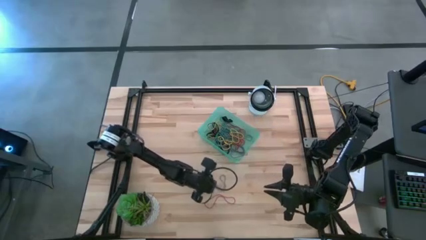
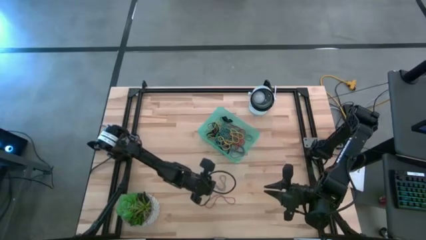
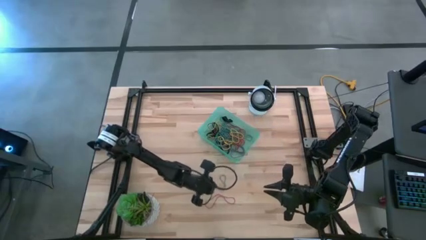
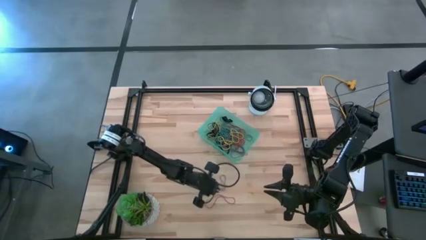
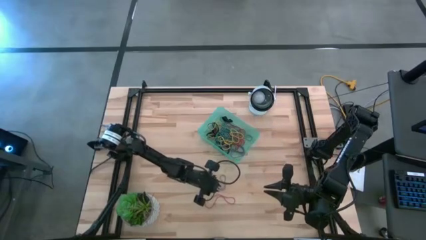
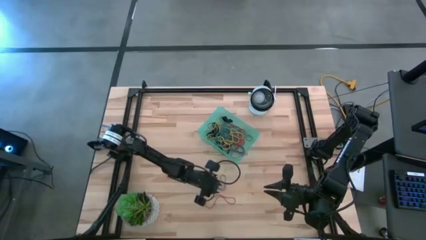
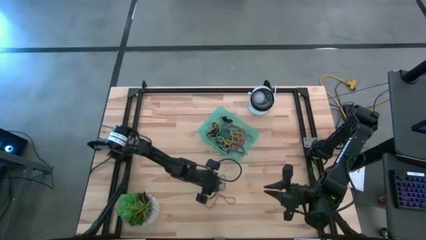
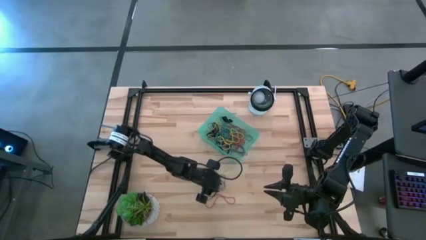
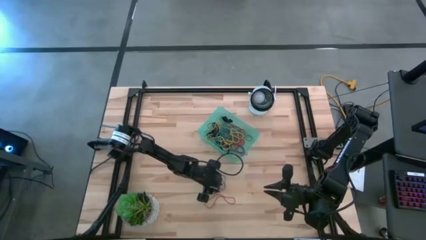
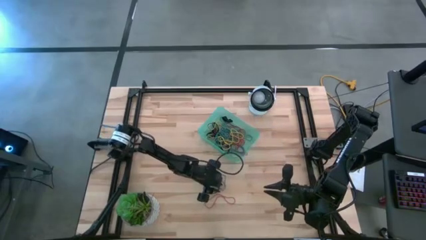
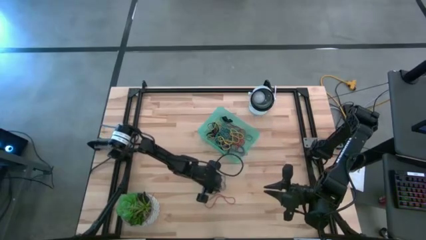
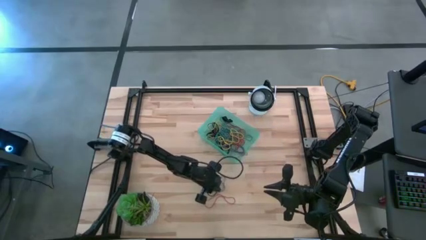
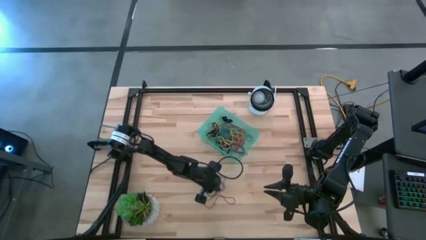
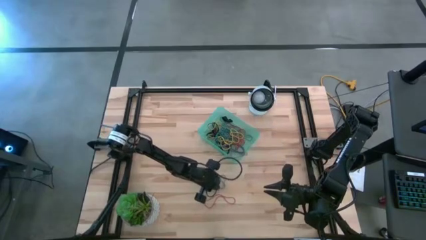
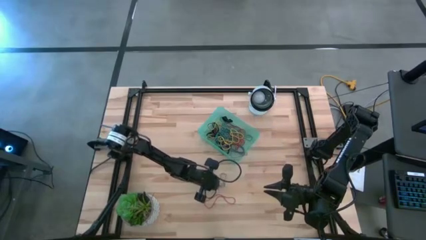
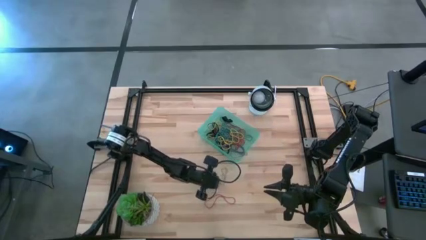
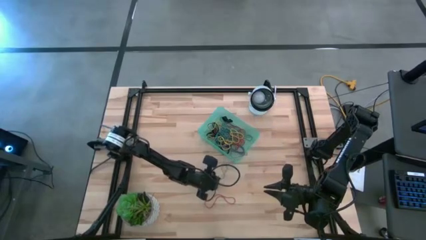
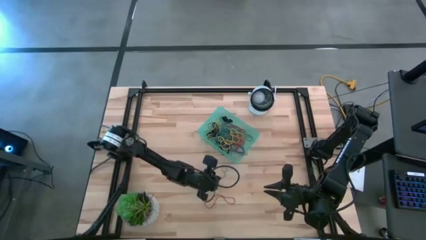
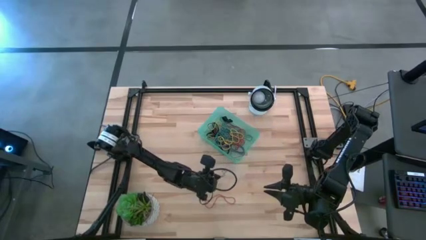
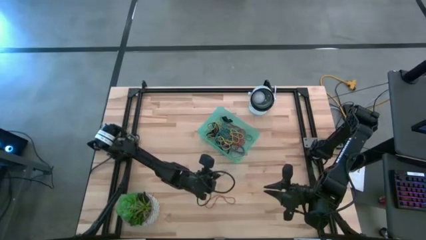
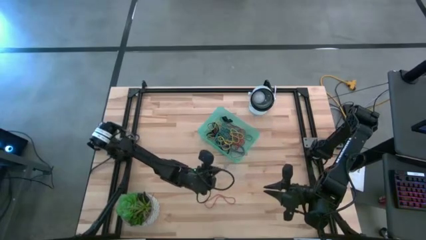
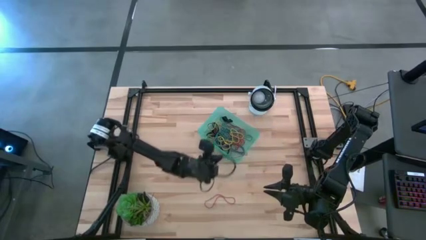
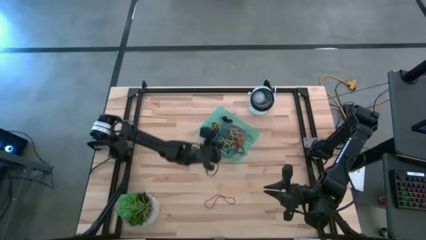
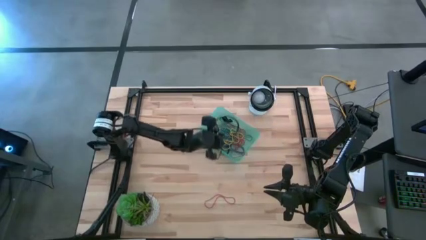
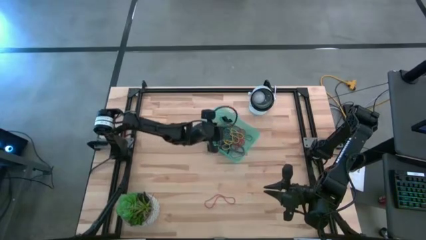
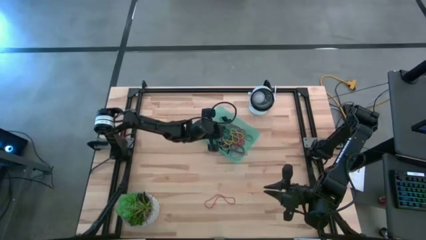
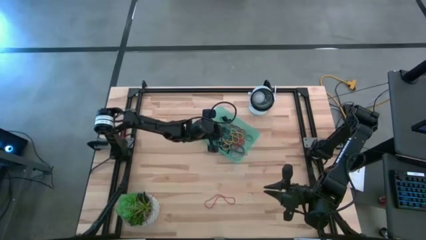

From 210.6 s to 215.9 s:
Task: Pick and place rubber bands into bin
Put the blue rubber band into the blue bin

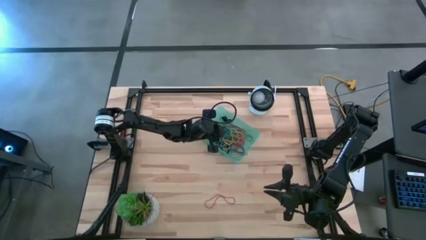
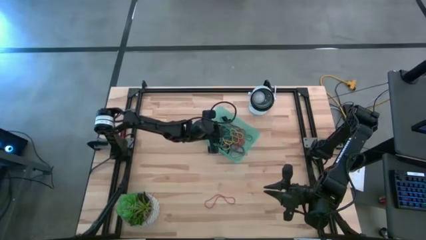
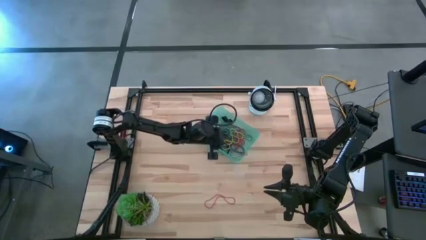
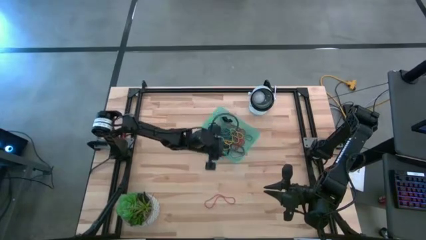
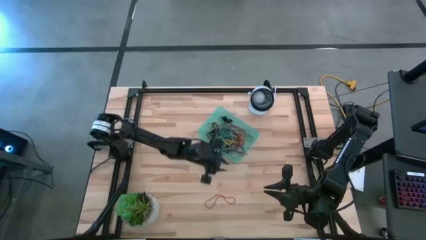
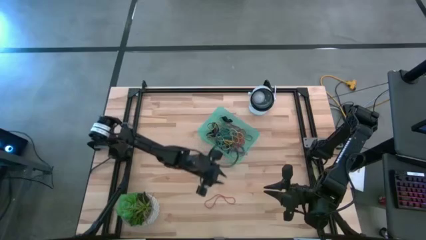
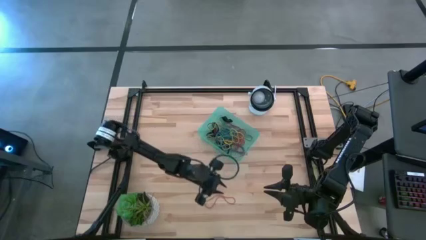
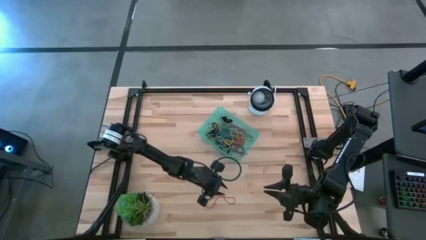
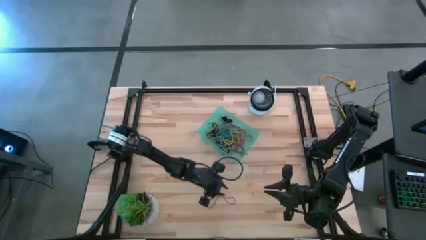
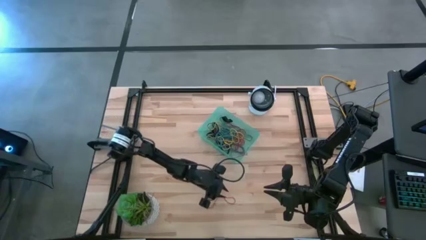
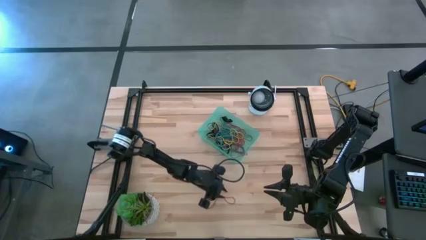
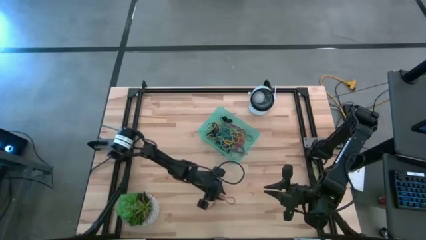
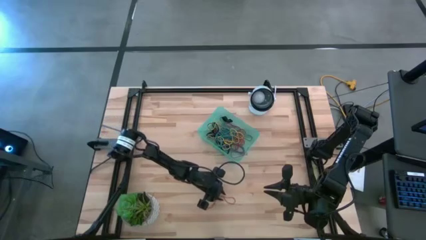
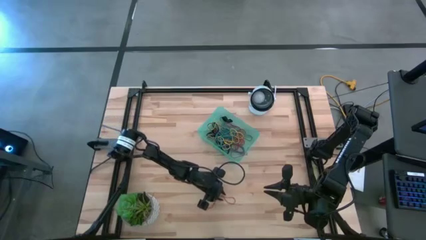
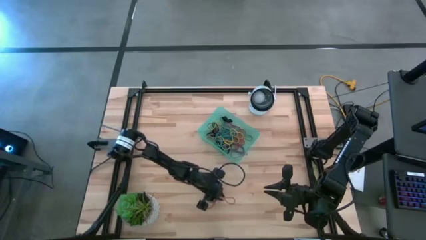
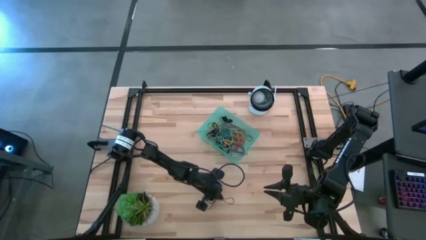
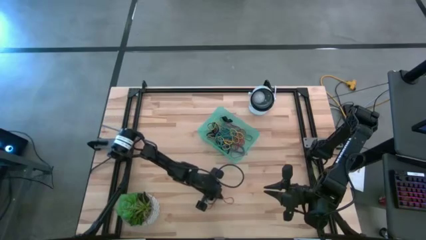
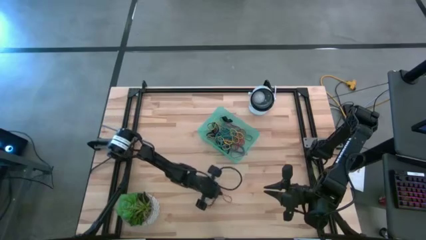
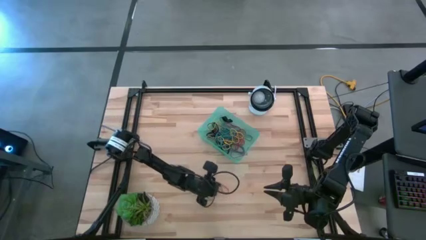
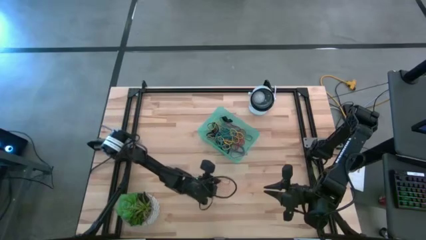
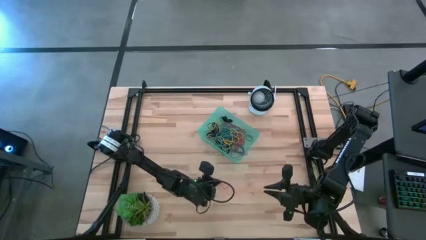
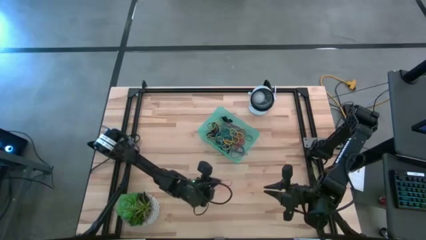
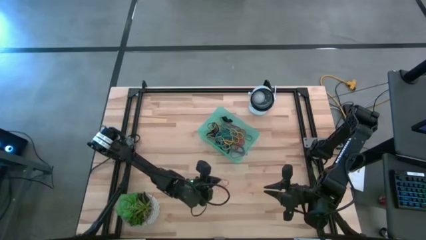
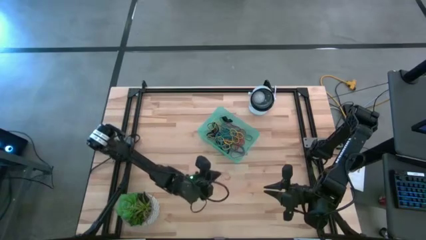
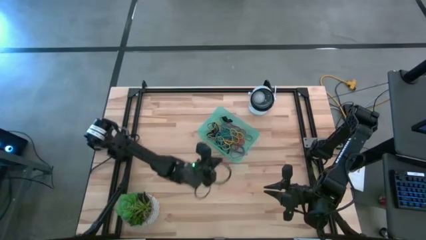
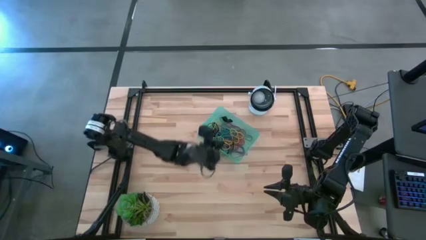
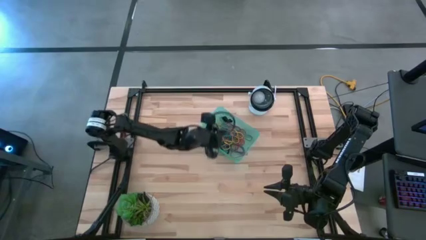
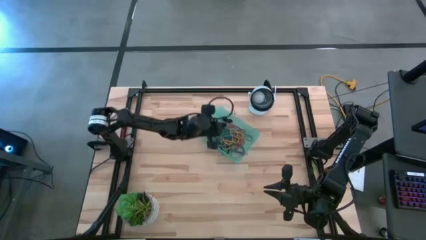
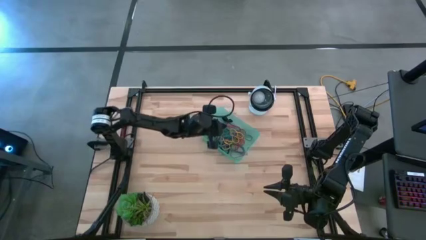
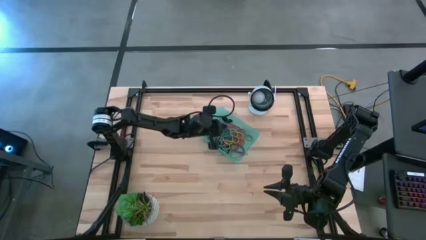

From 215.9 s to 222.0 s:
Put the red rubber band into the blue bin

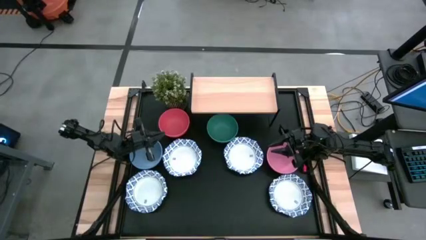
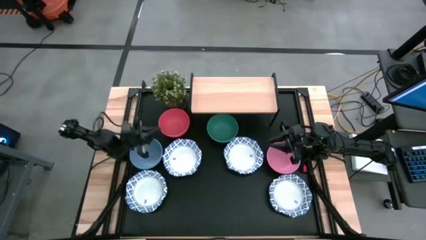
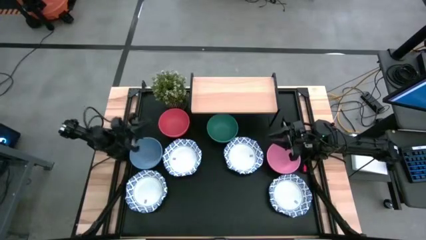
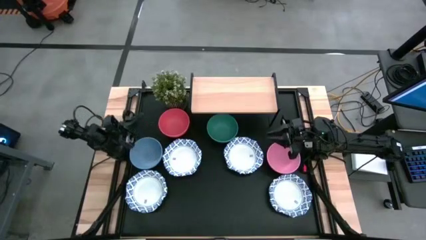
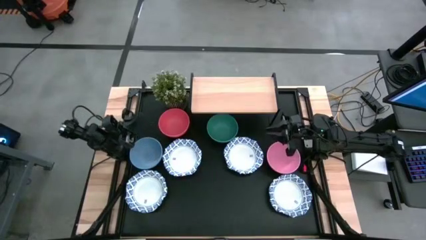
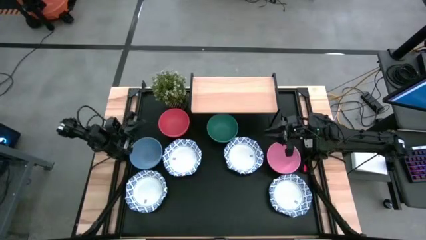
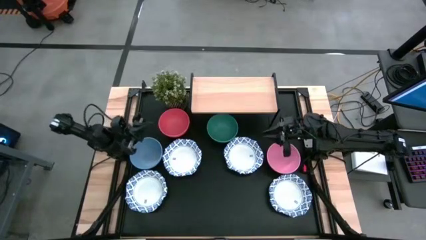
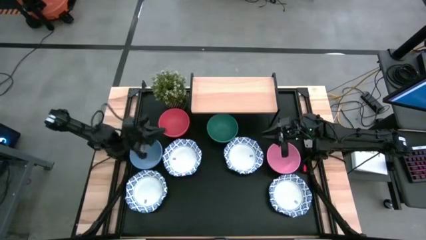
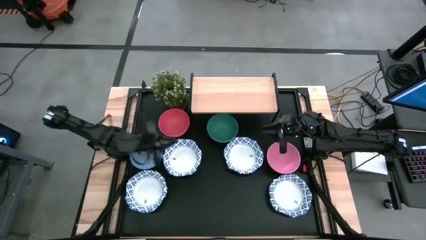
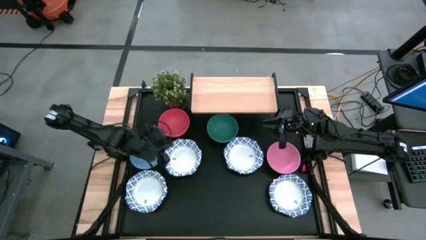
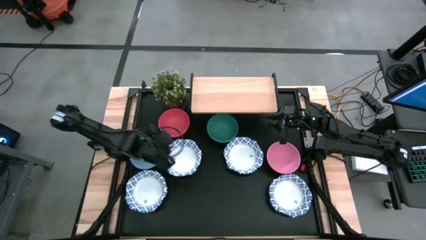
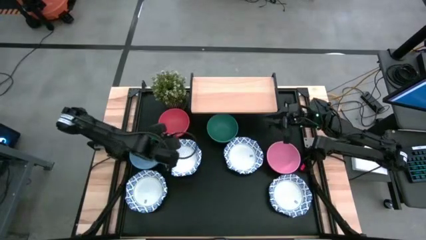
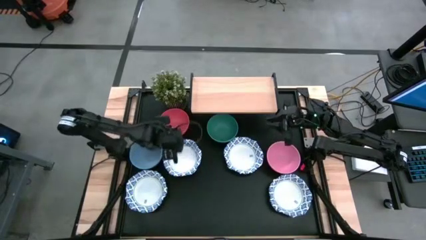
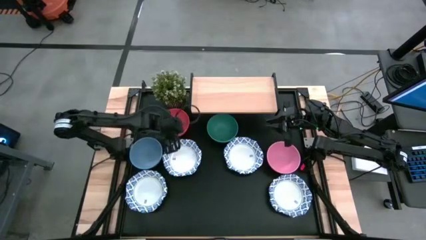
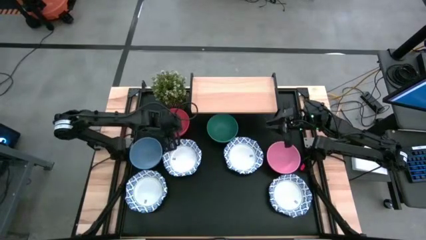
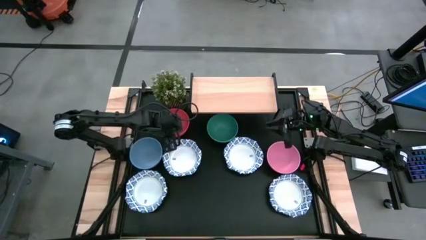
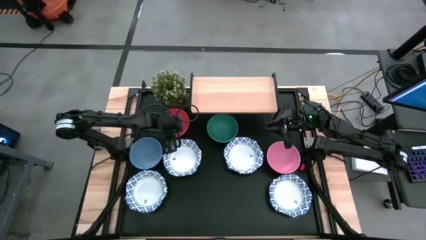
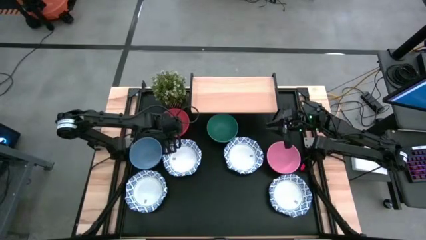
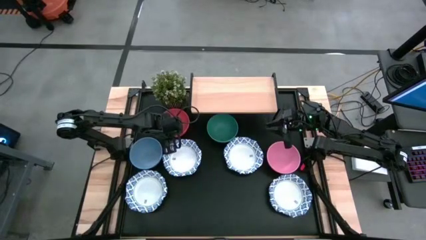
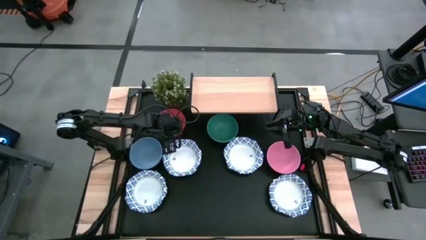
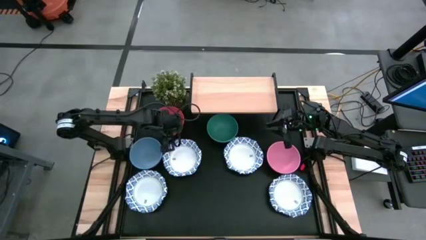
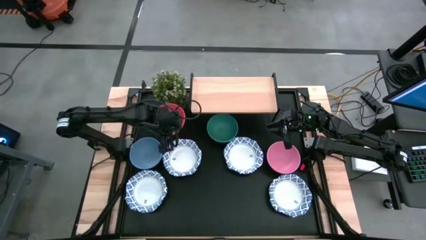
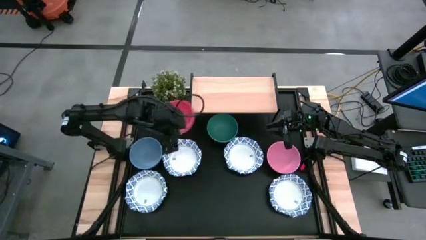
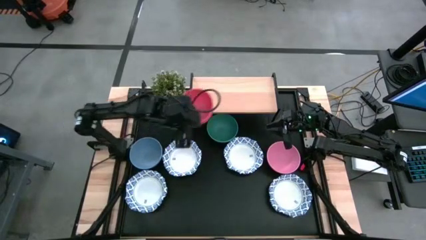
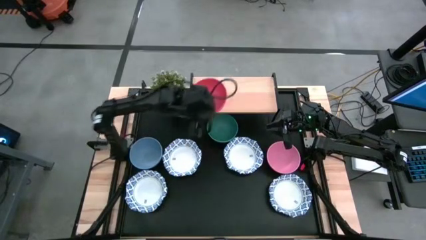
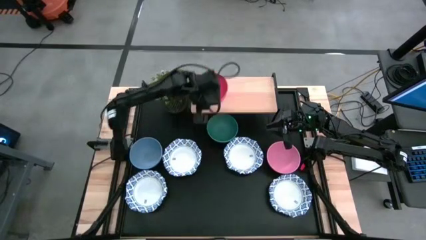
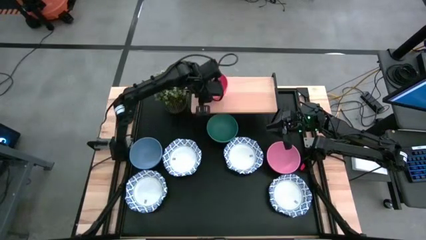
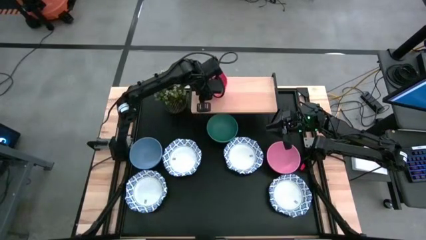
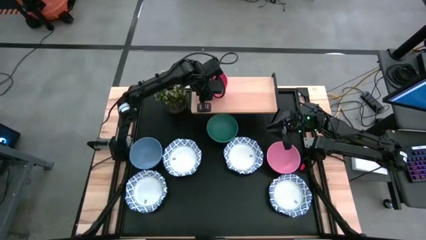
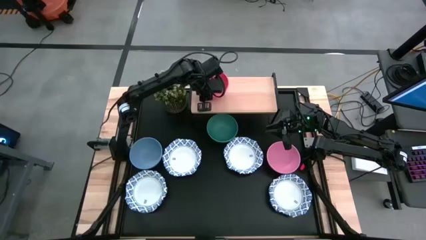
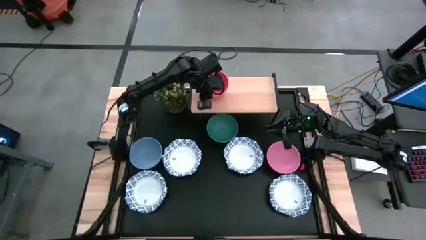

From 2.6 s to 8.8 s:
Task: Place and stack bowls onto a shelf
Put the orange bowl on the shelf
